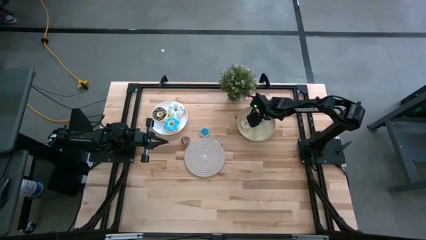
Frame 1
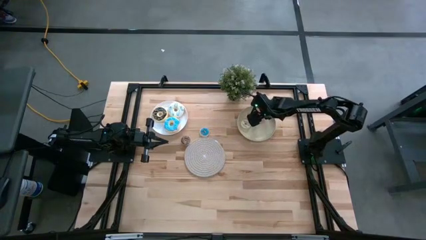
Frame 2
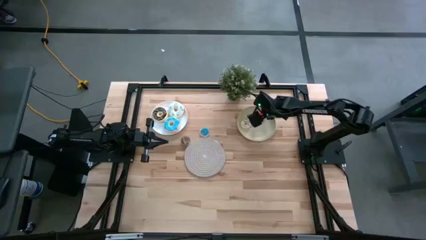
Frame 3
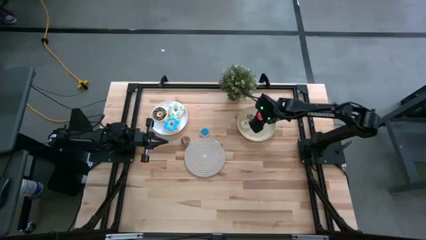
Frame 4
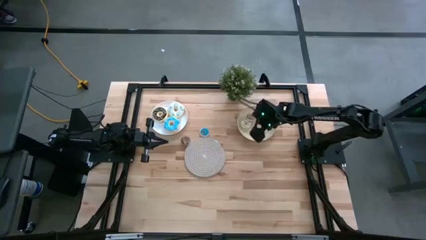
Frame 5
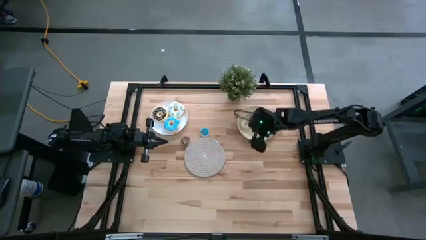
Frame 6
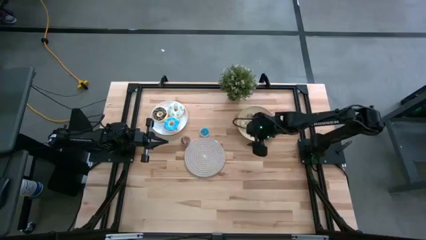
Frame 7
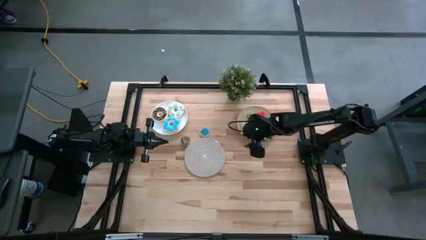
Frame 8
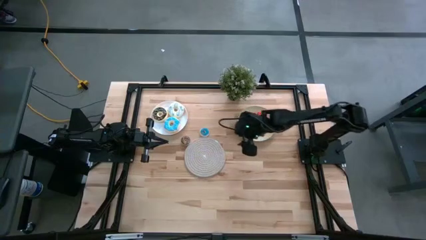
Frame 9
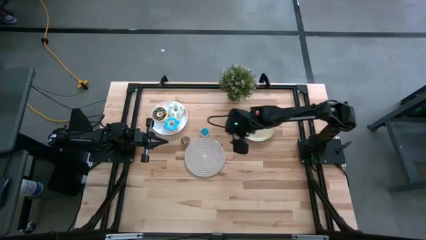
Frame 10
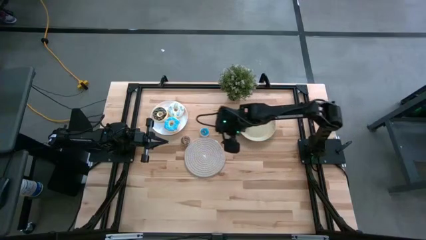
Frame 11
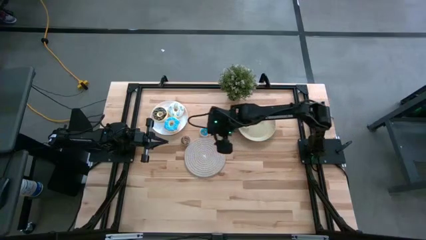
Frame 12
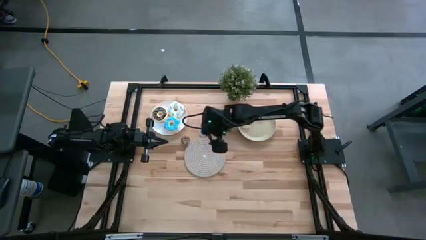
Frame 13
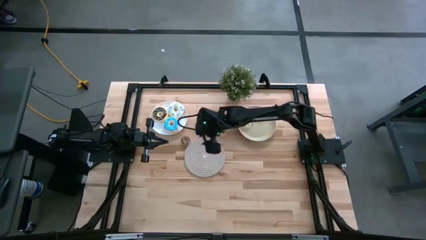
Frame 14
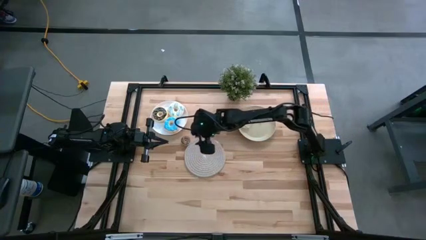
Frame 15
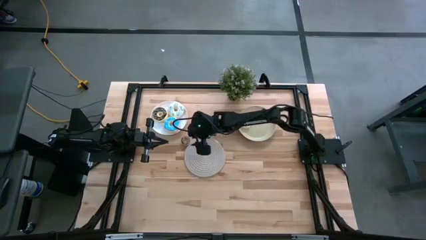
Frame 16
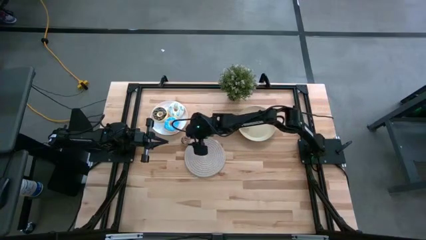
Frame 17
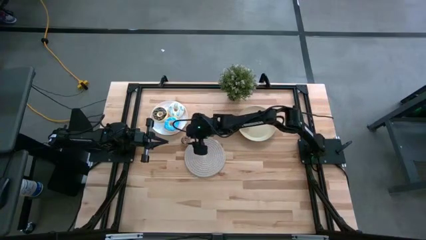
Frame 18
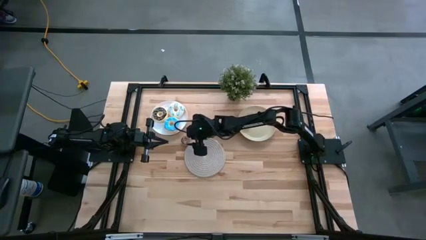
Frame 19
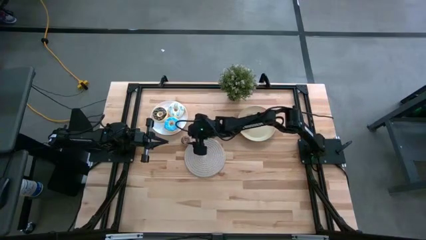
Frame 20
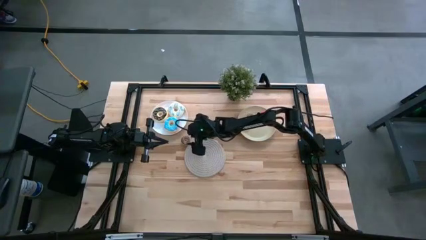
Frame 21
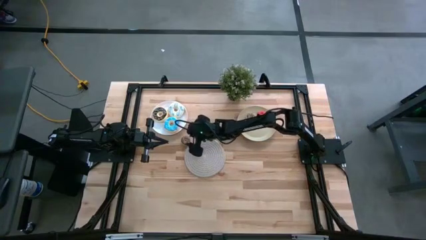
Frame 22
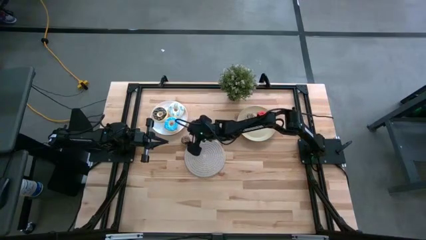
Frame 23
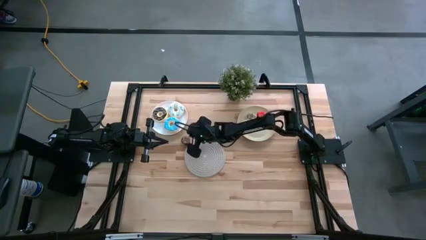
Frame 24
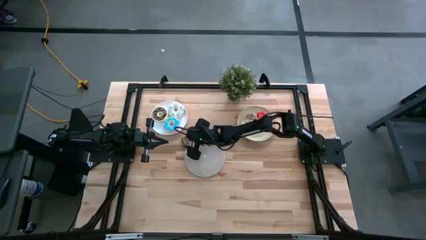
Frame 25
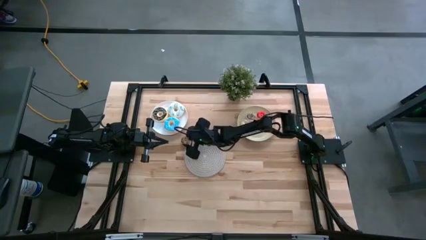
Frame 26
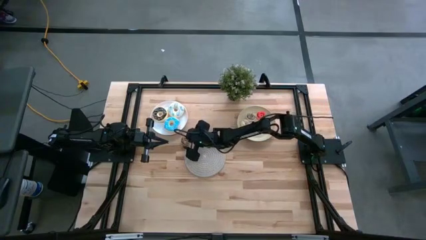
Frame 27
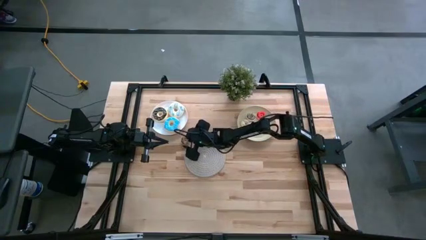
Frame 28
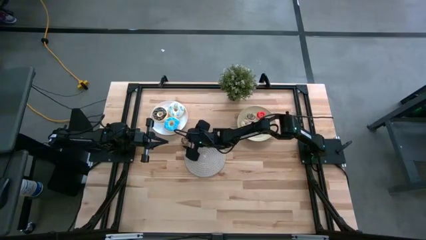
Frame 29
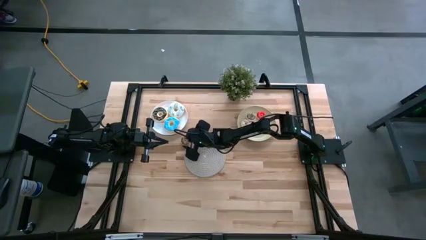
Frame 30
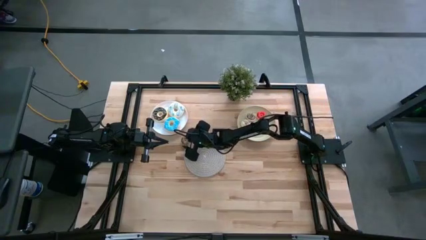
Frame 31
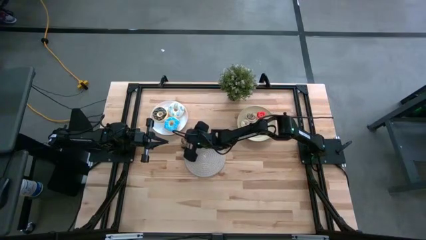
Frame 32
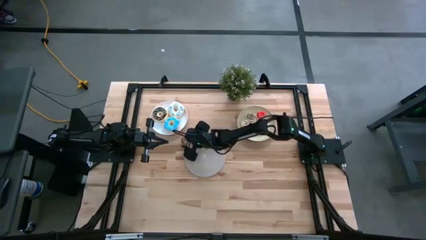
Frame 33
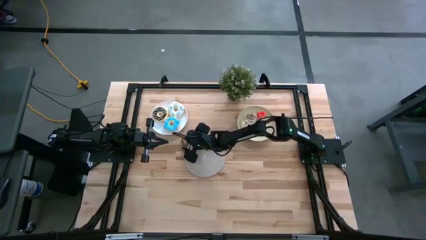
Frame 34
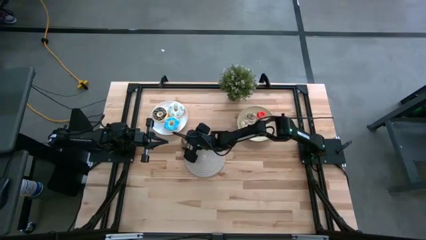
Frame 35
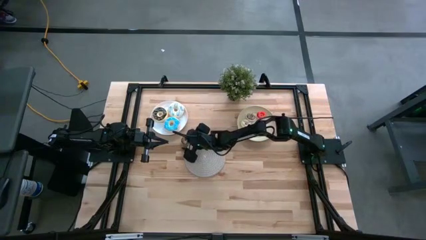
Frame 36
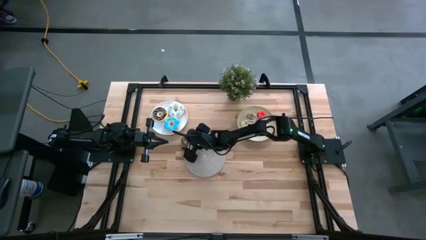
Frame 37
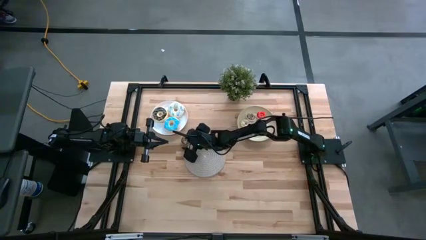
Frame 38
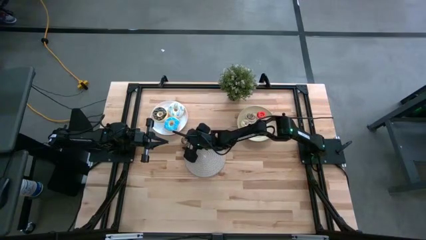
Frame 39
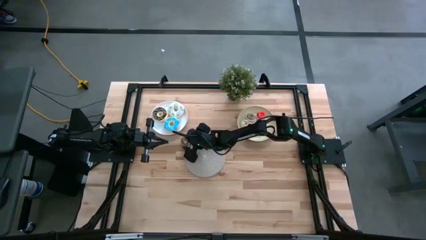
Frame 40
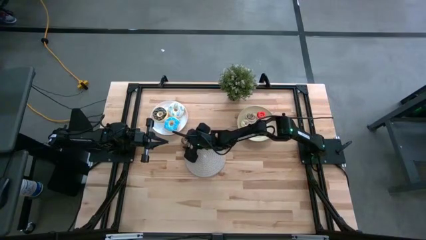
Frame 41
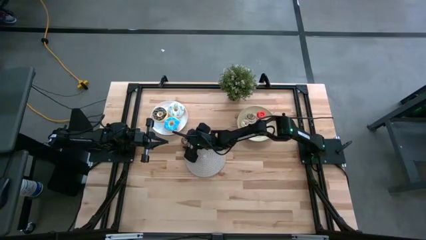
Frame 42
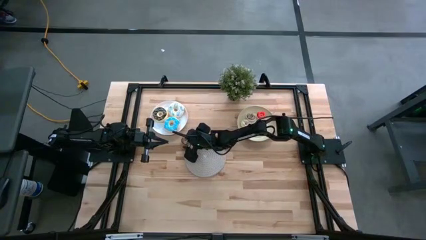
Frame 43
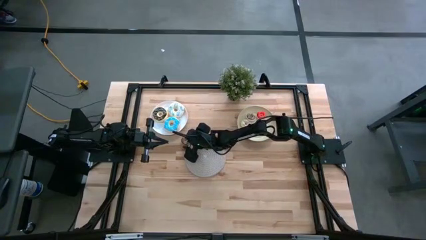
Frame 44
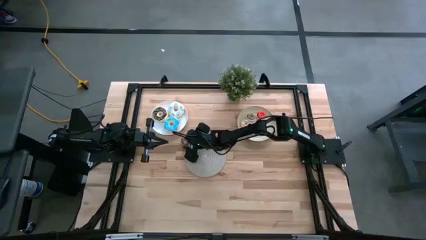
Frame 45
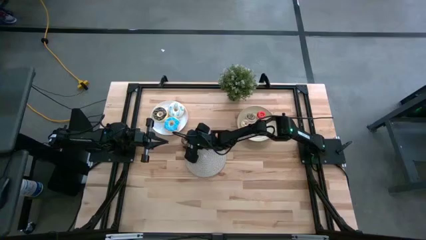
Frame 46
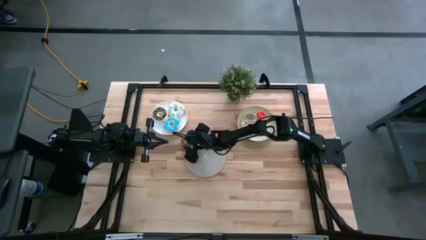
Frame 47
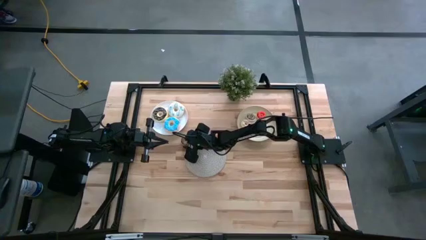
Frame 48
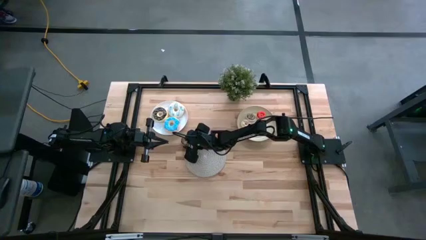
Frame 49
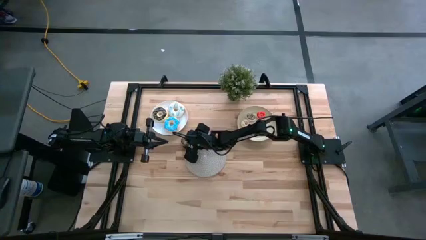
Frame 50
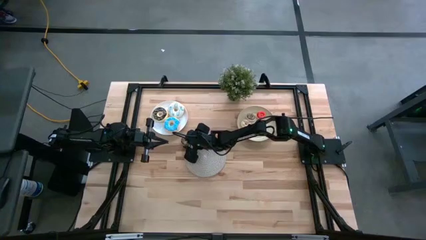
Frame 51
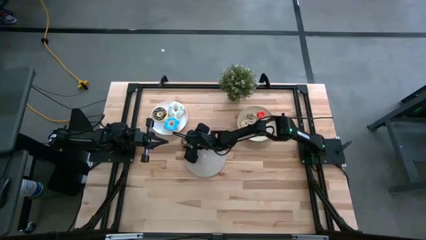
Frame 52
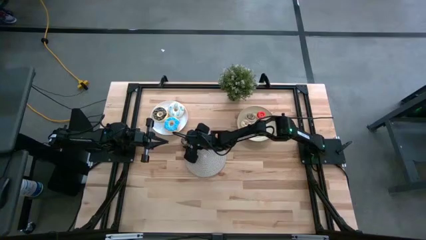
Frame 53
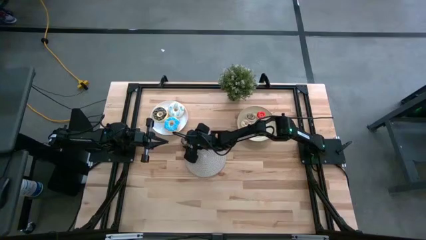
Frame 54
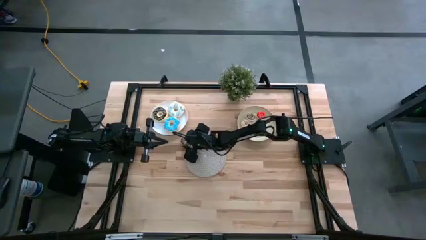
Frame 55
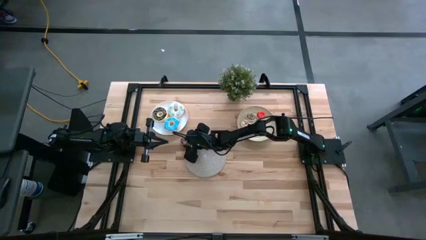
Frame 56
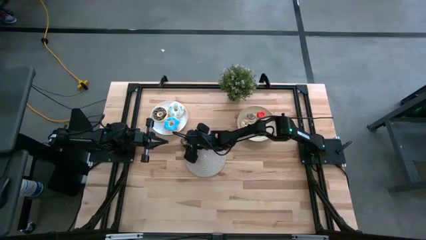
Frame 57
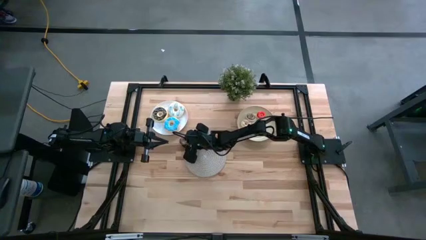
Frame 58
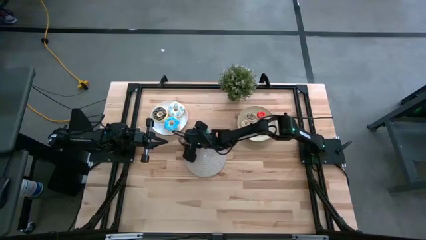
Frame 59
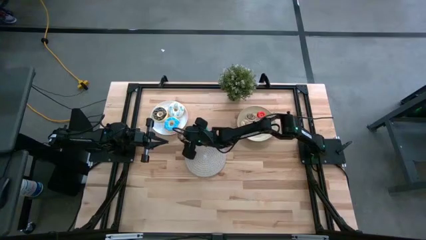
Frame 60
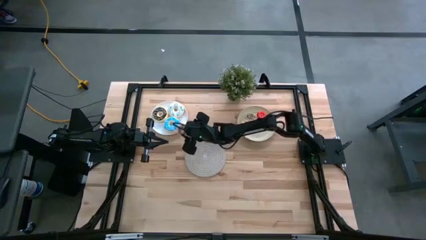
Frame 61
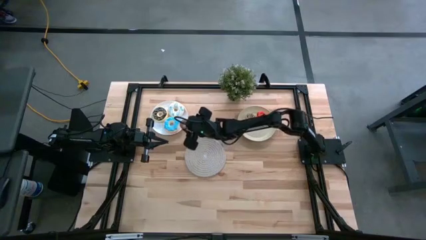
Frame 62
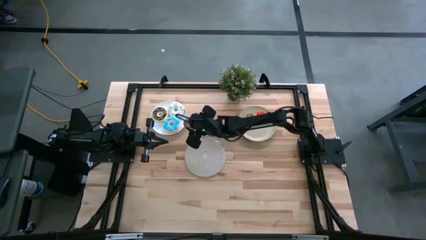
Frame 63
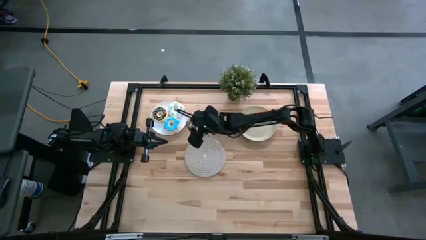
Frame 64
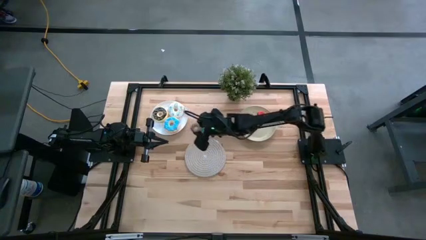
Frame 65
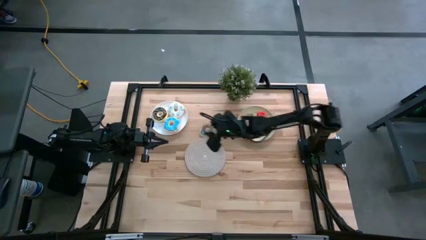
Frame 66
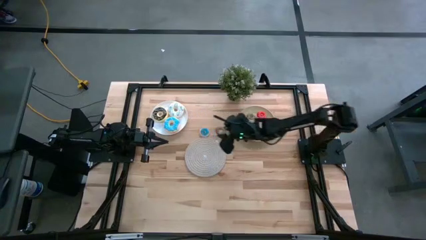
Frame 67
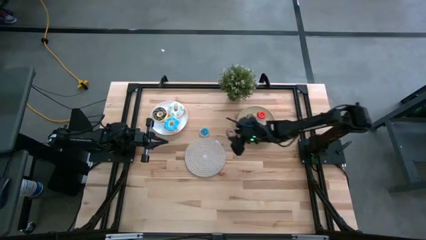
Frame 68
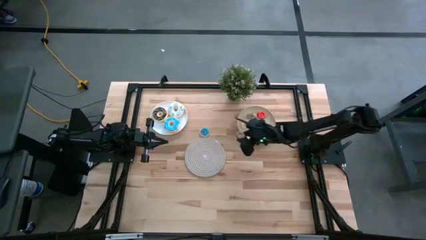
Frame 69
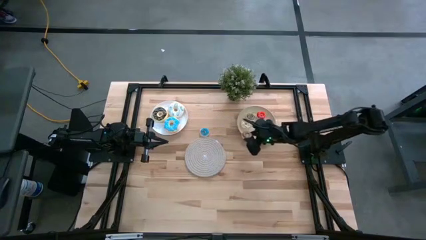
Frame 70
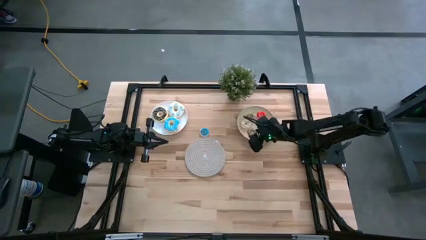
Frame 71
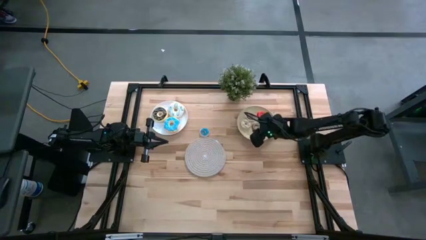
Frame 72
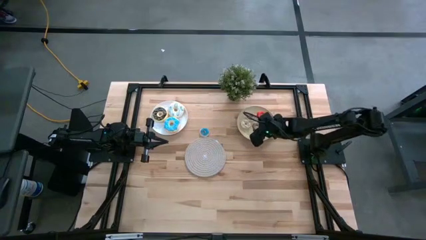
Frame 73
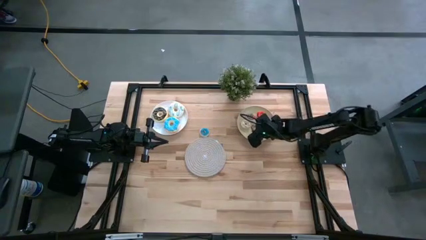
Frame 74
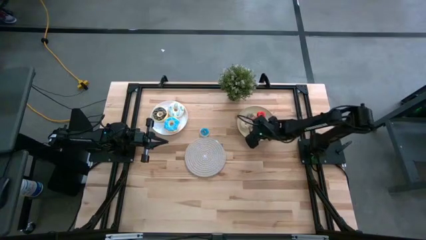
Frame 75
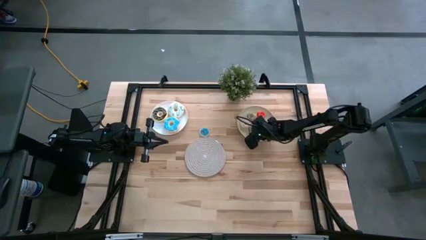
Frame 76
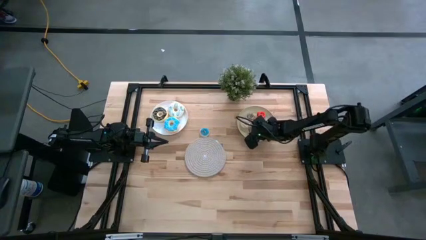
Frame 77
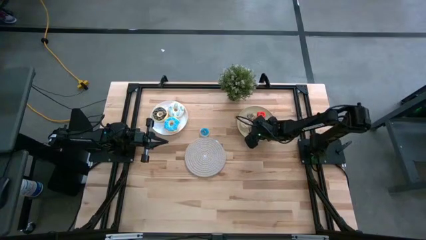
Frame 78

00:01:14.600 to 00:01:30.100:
Task: Pick & Place donuts
Put the small brown donut on the brown plate
